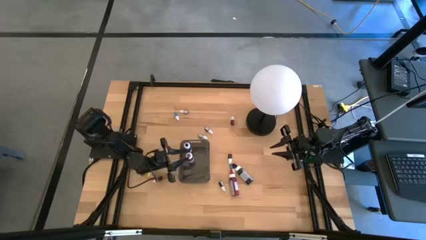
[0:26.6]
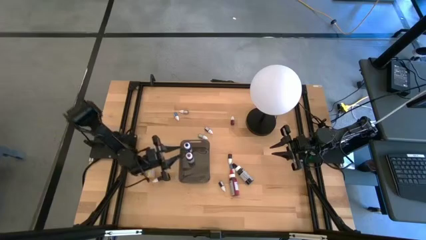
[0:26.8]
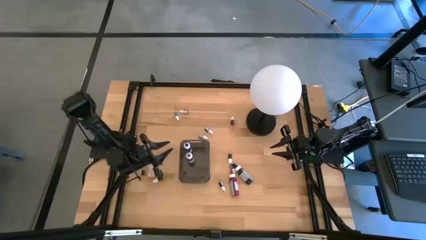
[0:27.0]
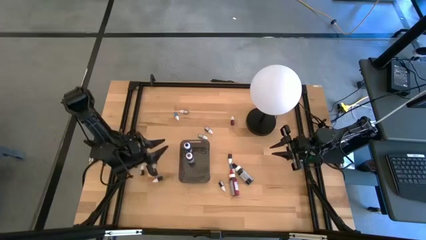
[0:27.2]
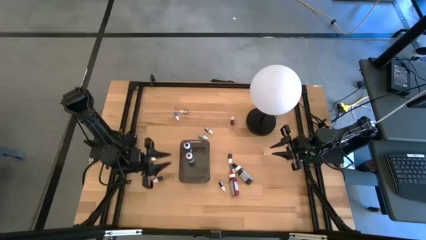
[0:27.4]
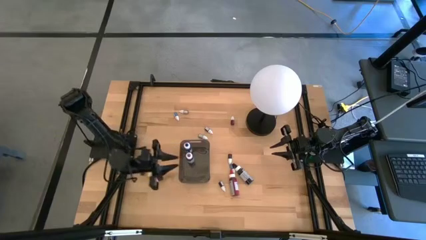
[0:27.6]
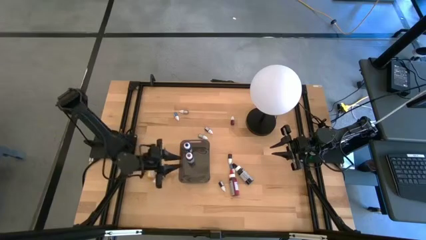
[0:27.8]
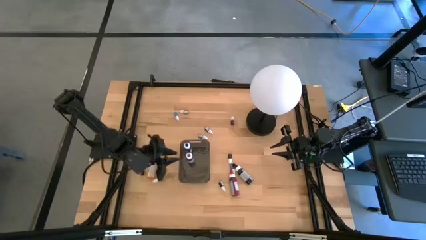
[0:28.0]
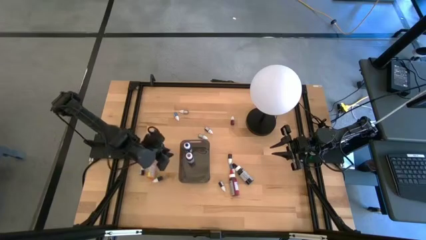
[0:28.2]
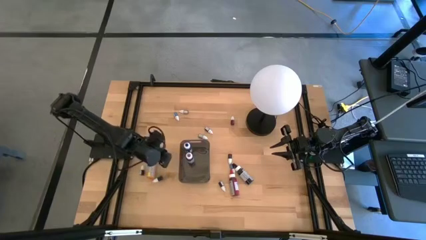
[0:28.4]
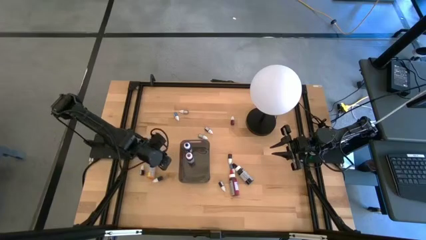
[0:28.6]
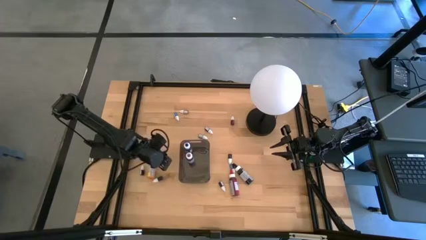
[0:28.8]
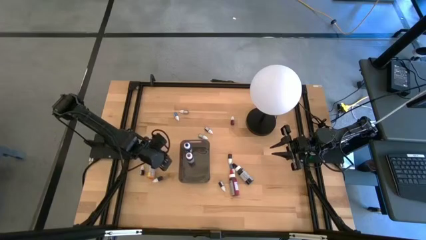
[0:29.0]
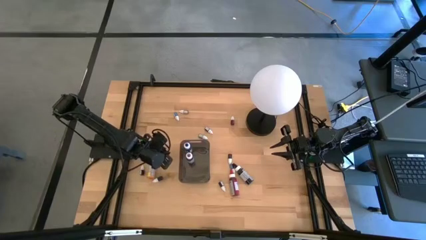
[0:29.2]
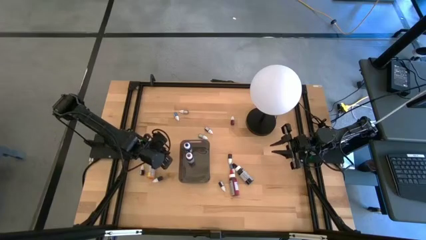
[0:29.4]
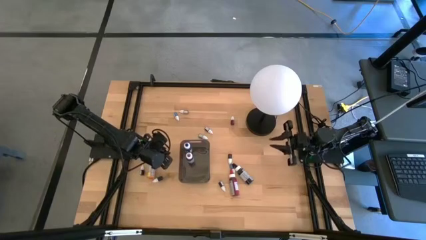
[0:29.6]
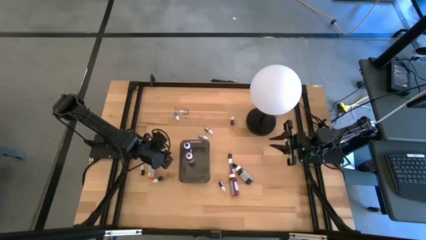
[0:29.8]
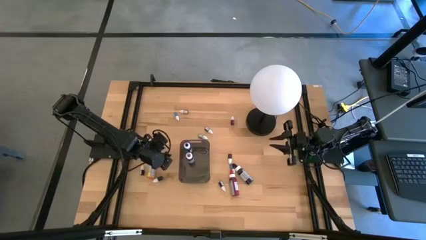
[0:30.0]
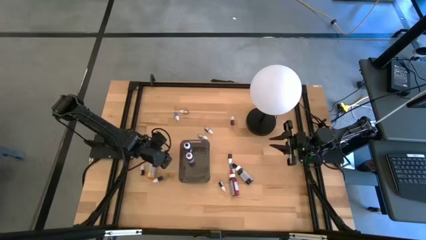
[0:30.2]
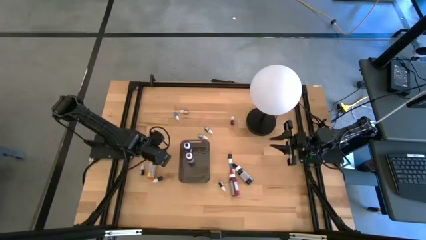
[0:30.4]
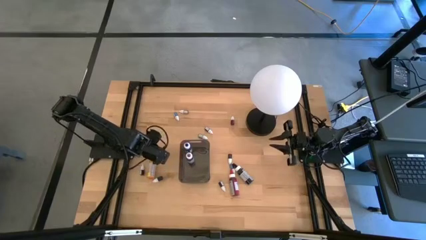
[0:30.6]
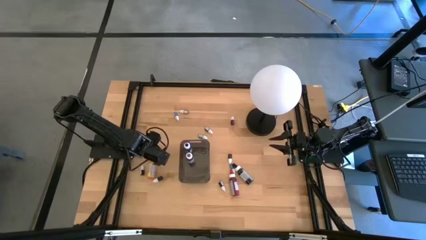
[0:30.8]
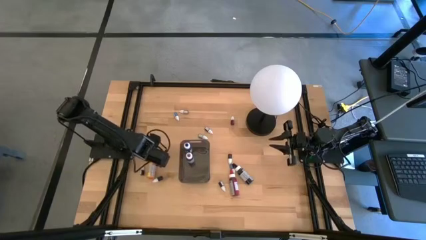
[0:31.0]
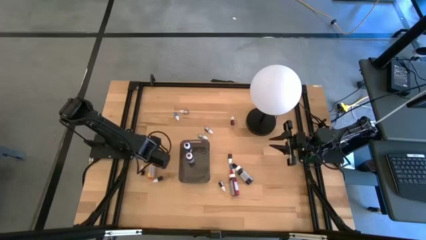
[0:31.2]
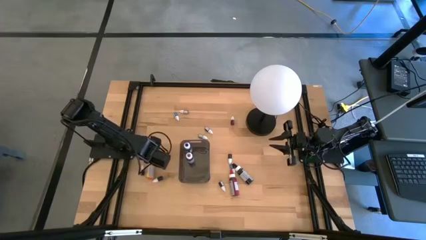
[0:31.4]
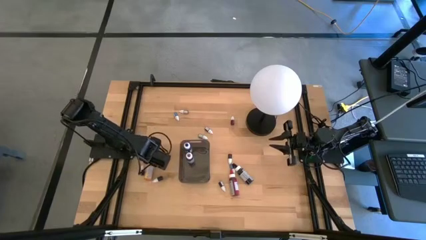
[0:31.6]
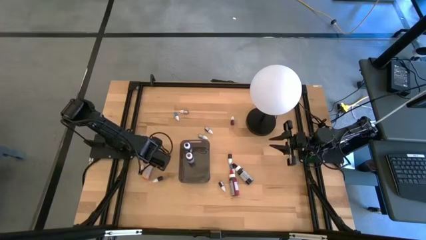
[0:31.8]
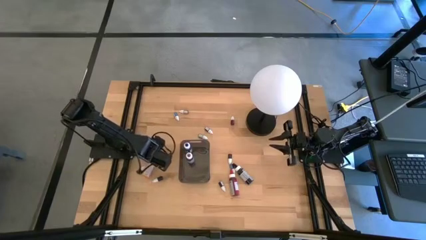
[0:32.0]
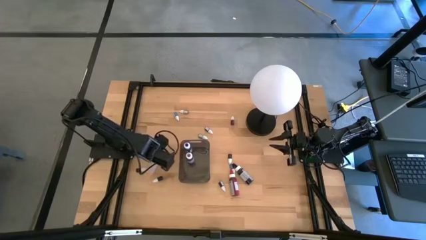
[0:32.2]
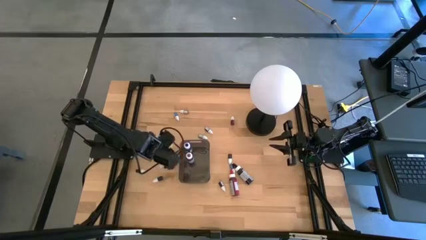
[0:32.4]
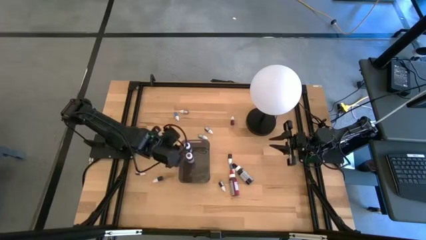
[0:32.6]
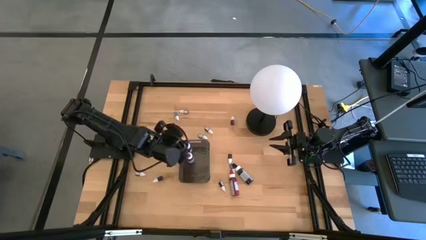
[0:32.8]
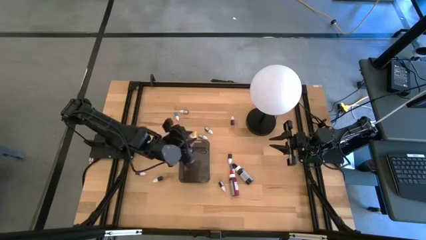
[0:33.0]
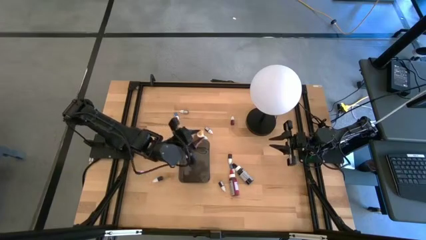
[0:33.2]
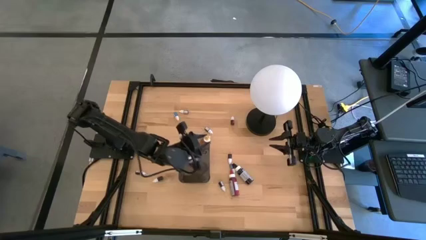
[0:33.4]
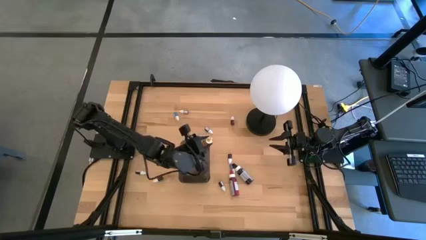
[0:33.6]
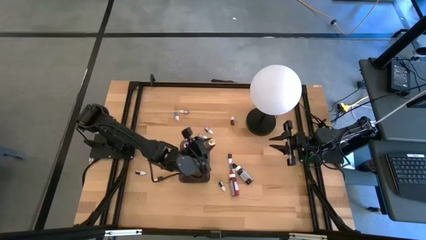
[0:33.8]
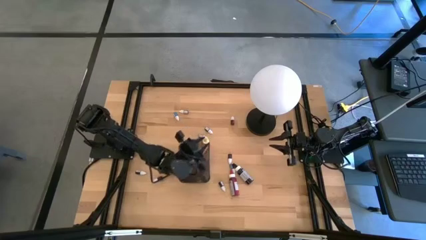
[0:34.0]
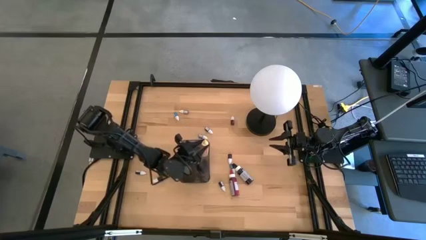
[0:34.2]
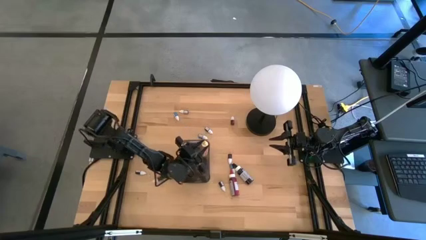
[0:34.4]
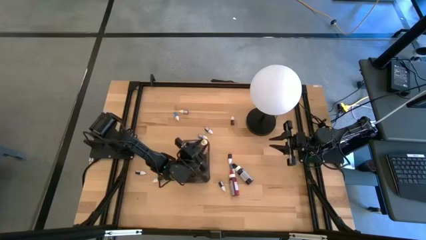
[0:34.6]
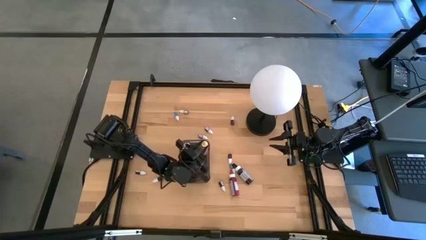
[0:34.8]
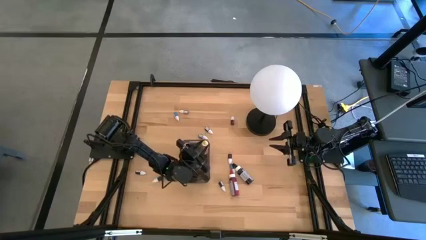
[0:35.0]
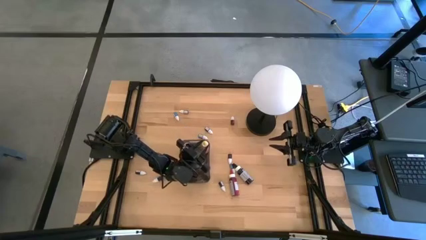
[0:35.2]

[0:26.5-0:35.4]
Task: Pick & Place food coloring
Put the large yellow food coloring bottle into the black bin

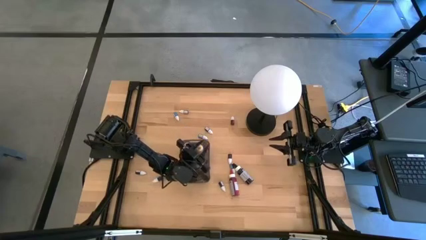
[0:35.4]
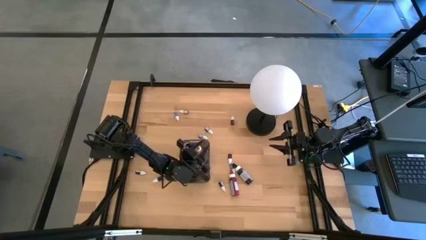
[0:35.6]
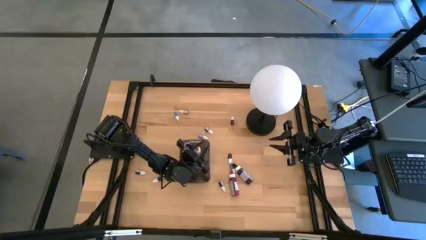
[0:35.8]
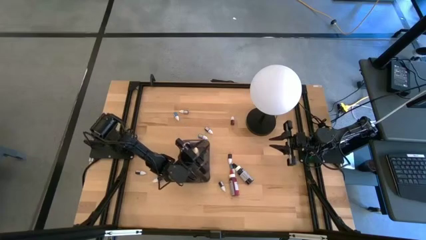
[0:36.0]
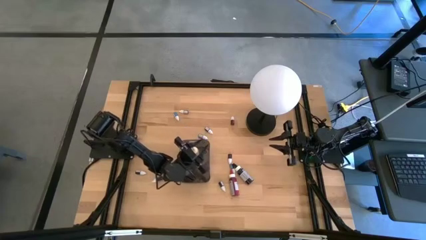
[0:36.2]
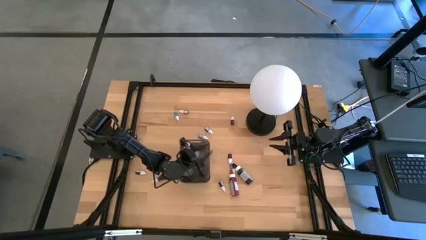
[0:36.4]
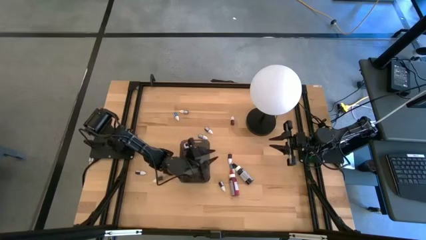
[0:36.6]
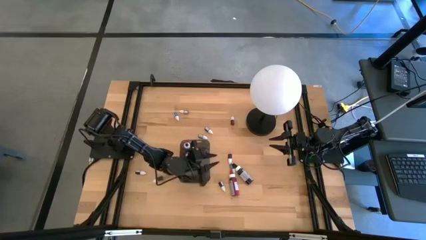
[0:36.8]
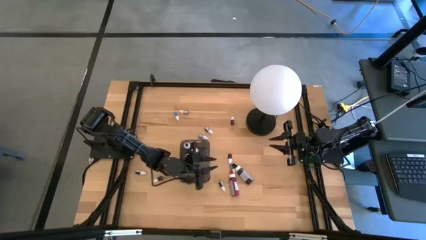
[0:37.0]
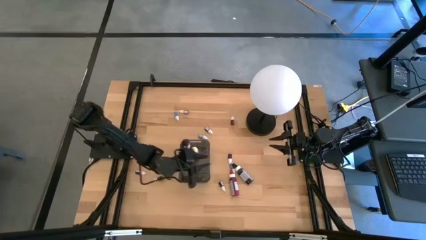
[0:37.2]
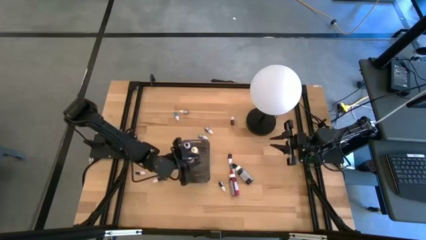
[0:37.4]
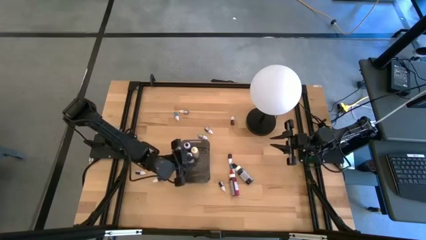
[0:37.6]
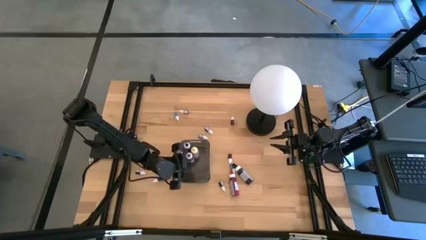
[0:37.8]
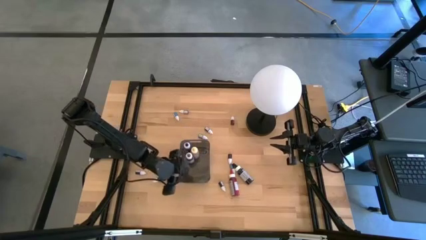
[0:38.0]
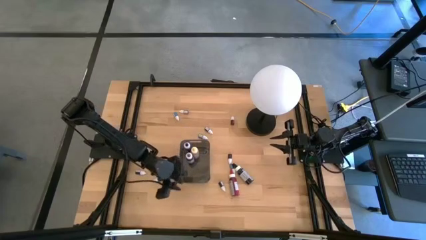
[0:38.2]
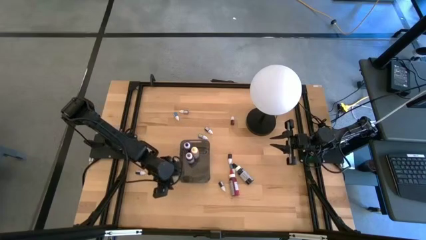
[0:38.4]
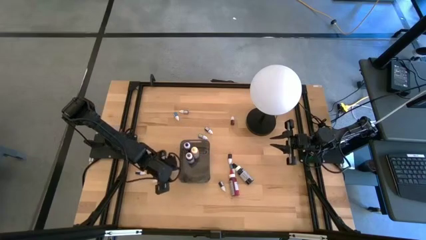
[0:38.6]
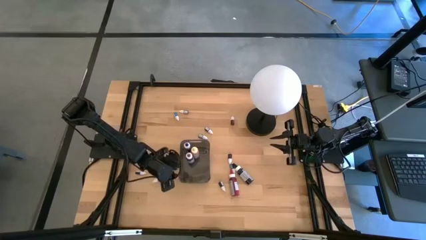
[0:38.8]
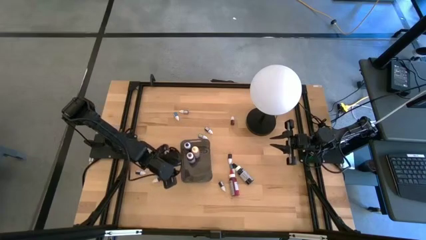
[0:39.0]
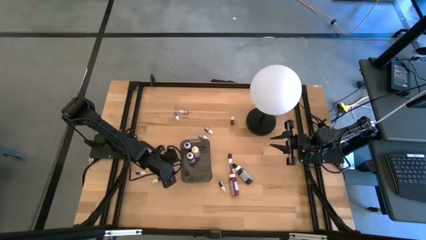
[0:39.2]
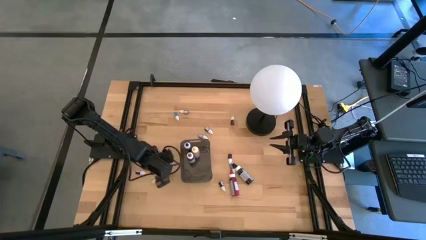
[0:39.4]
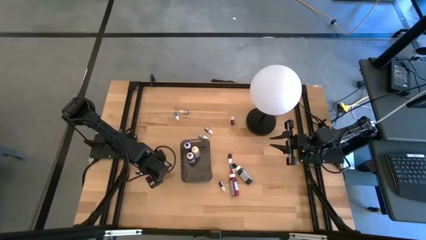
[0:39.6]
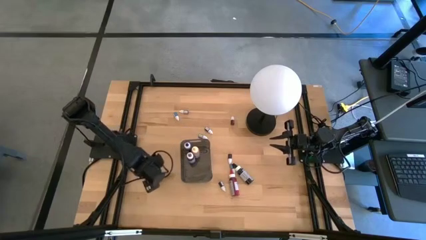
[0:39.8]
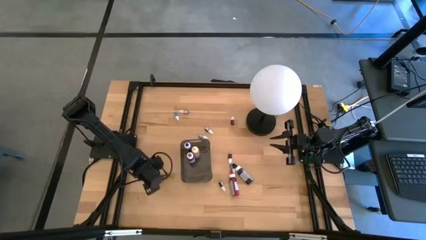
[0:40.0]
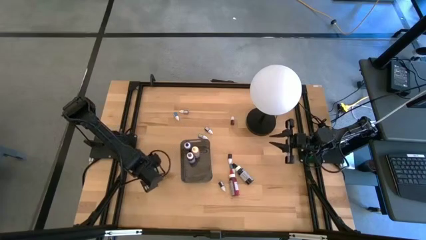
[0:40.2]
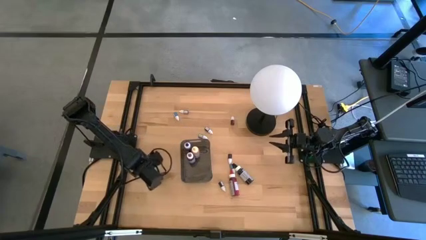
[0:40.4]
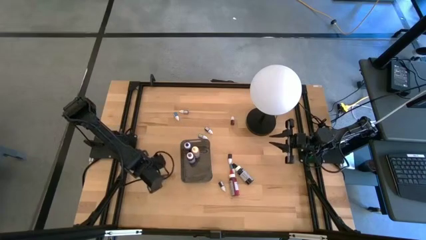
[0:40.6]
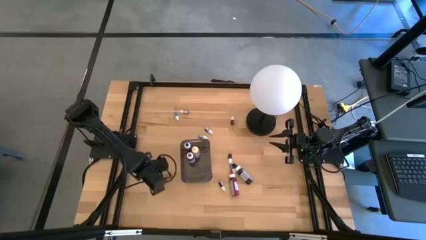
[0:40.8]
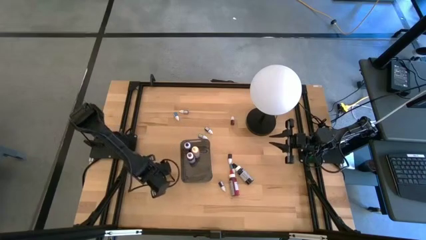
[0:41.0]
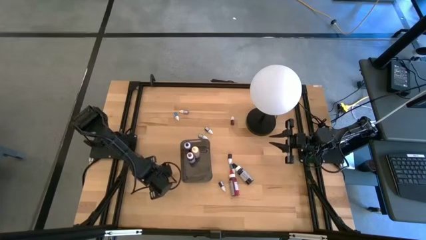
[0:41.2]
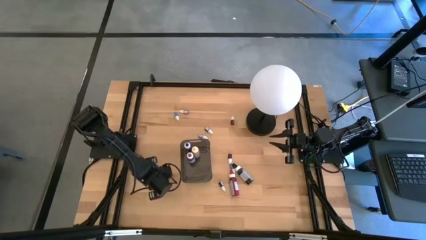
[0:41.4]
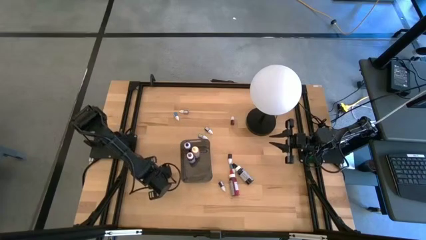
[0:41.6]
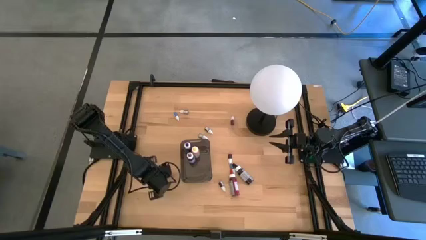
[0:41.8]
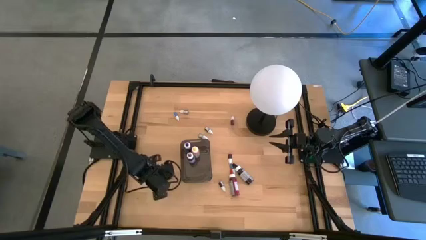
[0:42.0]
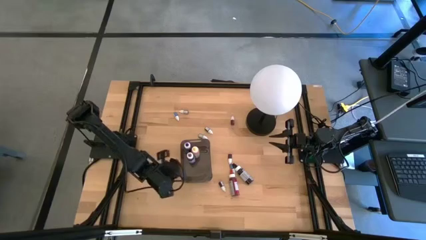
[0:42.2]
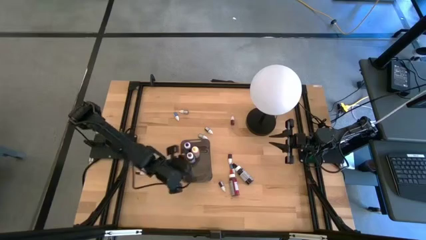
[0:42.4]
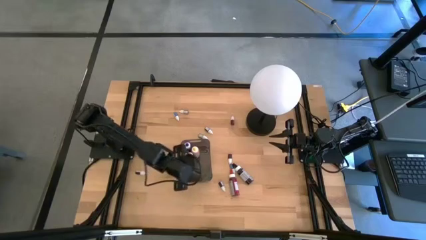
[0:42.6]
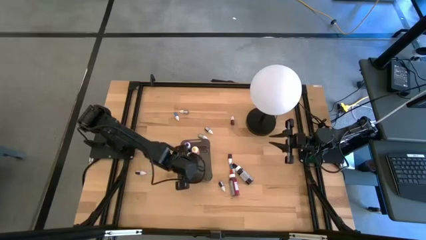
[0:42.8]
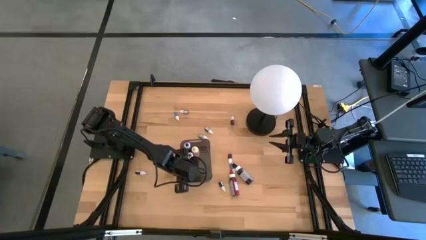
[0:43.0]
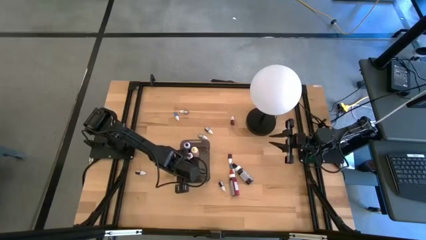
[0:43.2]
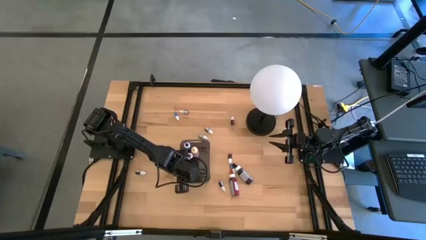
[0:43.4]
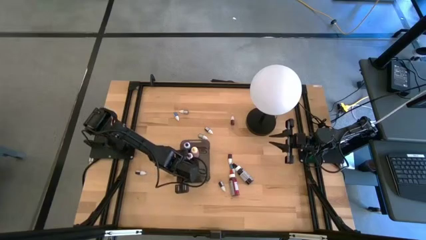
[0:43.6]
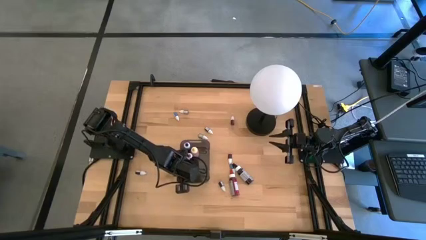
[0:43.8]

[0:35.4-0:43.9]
Put the small brown food coloring bottle into the black bin
